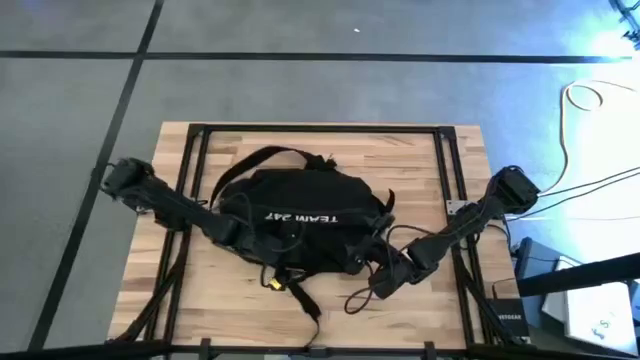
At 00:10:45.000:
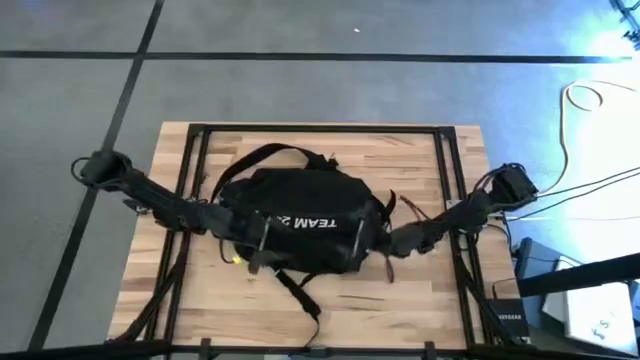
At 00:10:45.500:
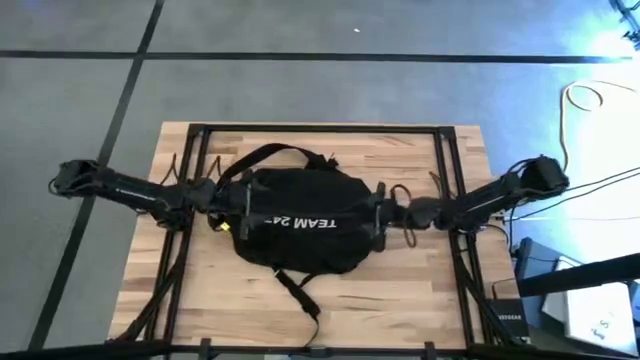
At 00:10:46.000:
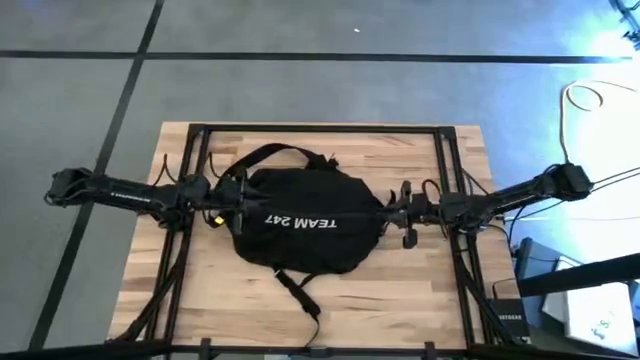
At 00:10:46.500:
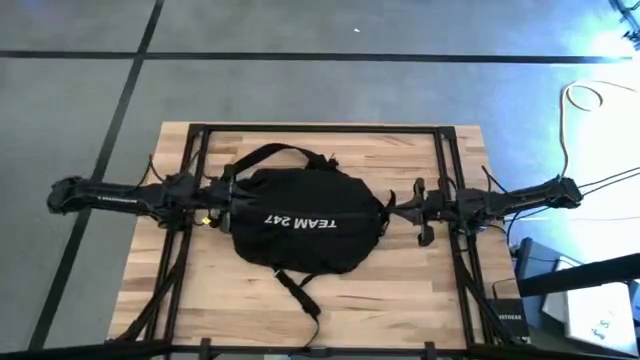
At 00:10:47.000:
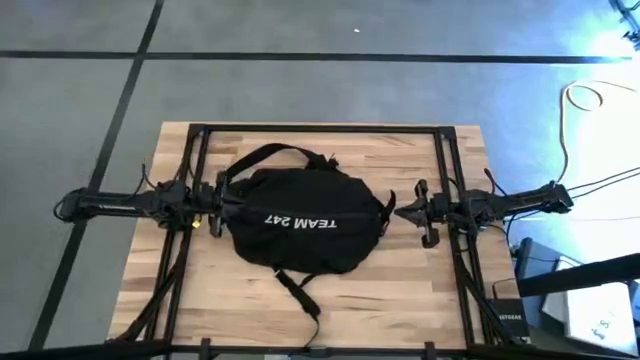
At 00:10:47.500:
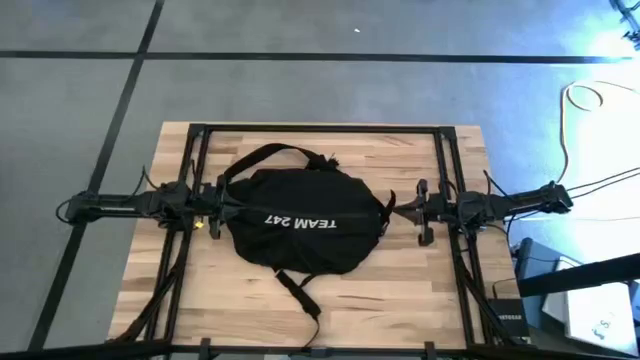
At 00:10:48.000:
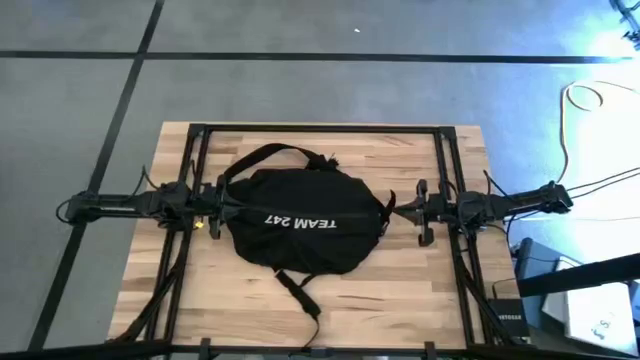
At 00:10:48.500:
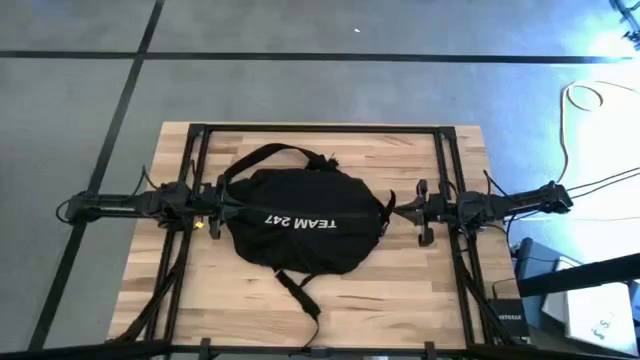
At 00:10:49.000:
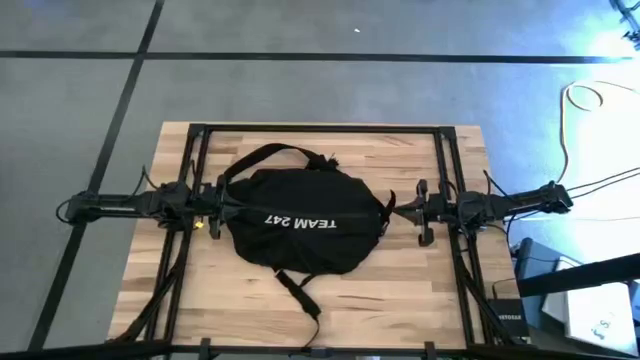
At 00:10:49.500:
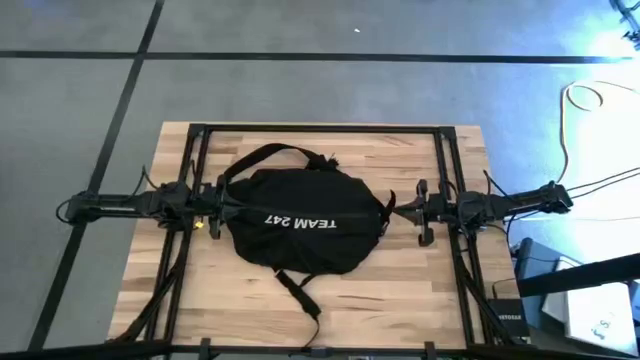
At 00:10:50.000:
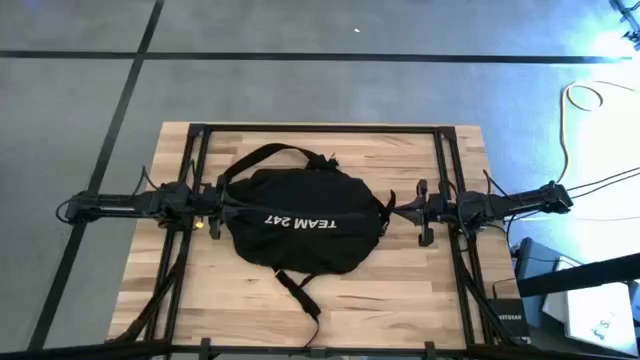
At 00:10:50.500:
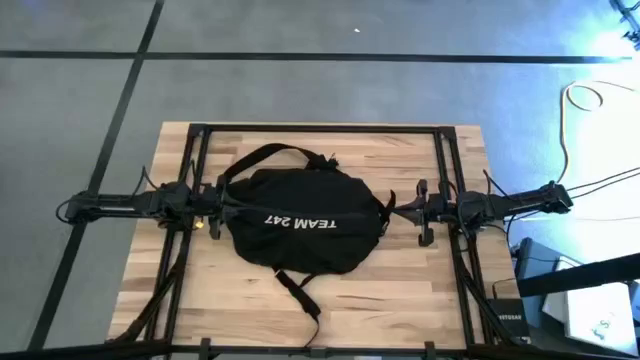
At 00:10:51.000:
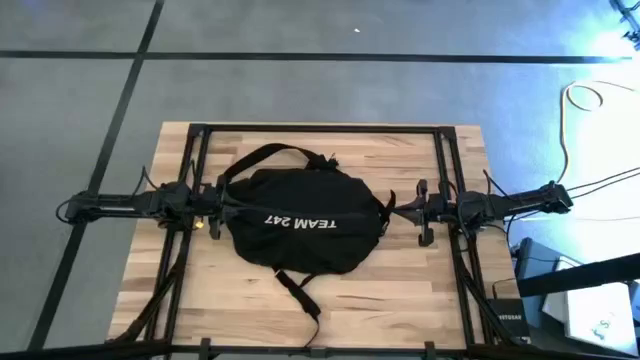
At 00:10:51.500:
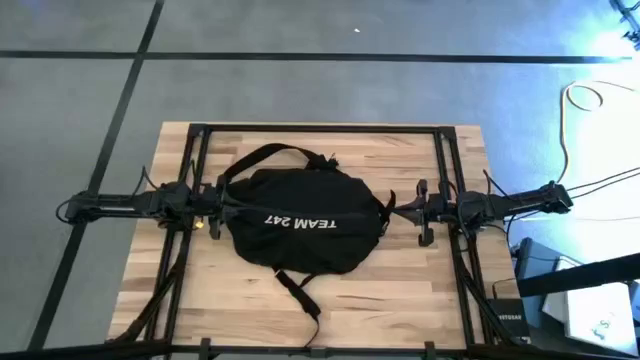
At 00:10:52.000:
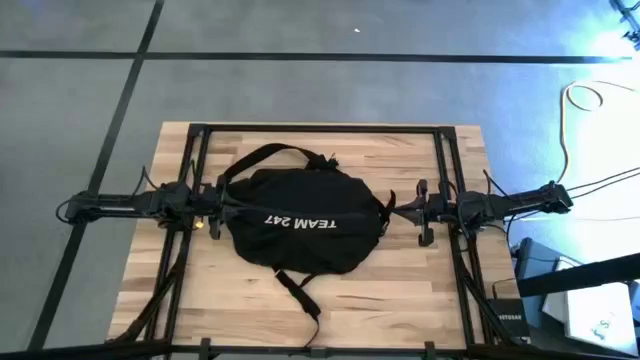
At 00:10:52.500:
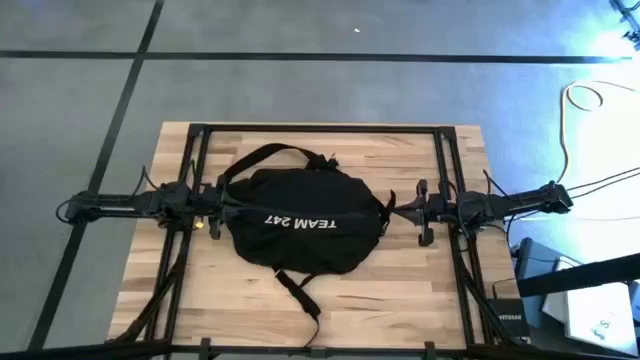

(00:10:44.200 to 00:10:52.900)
Task: Unpack backpack
Return to Home Position

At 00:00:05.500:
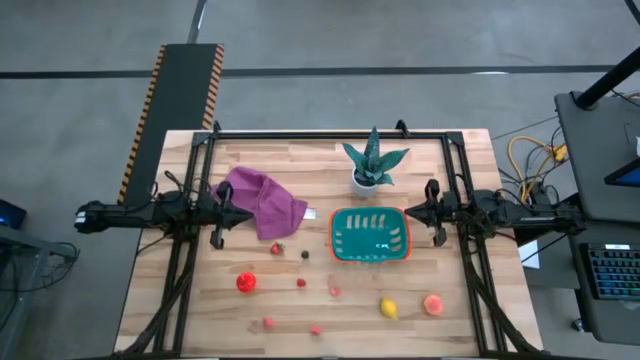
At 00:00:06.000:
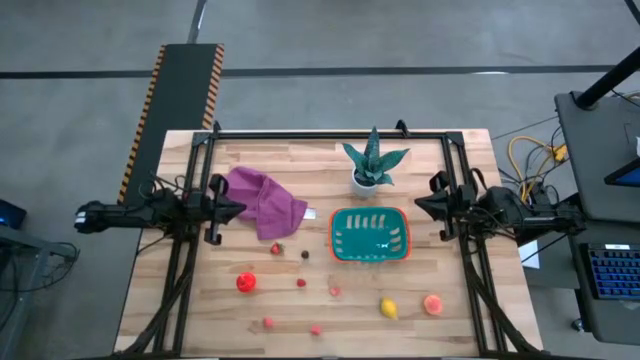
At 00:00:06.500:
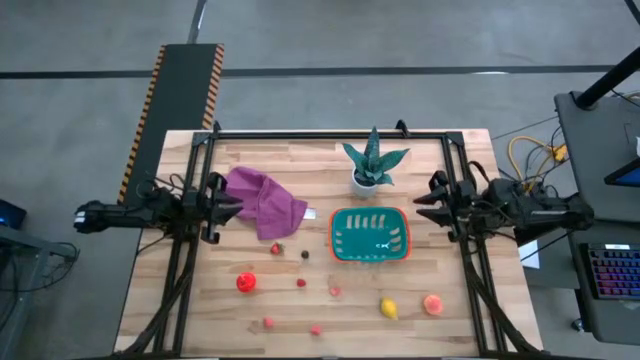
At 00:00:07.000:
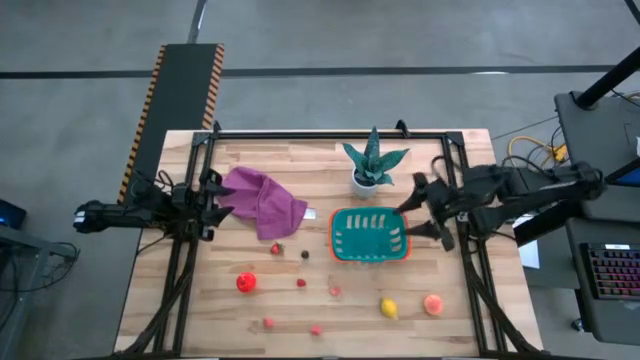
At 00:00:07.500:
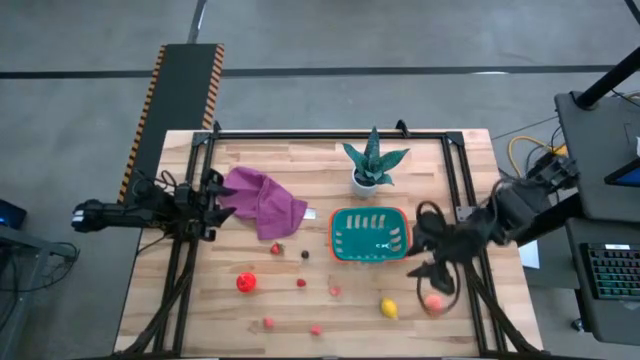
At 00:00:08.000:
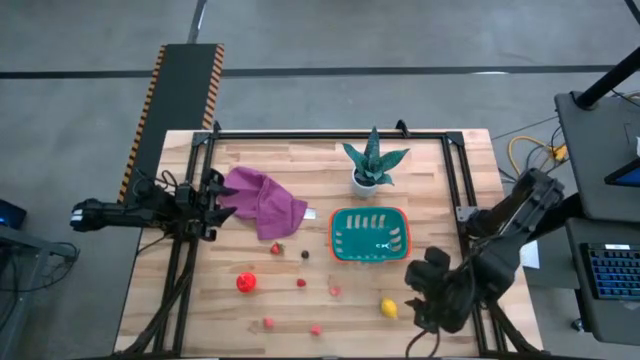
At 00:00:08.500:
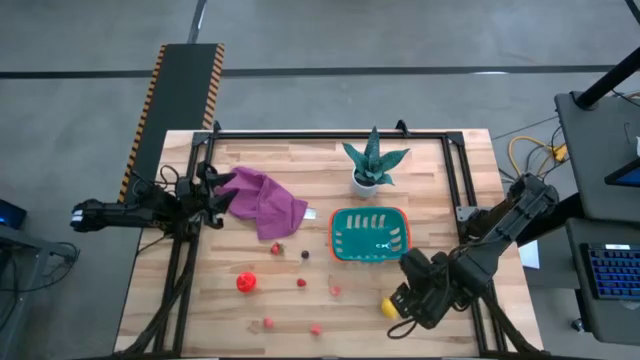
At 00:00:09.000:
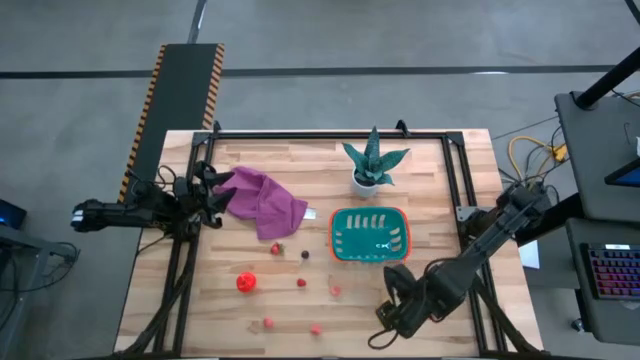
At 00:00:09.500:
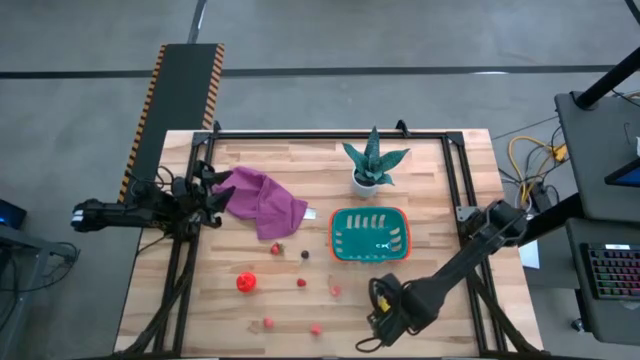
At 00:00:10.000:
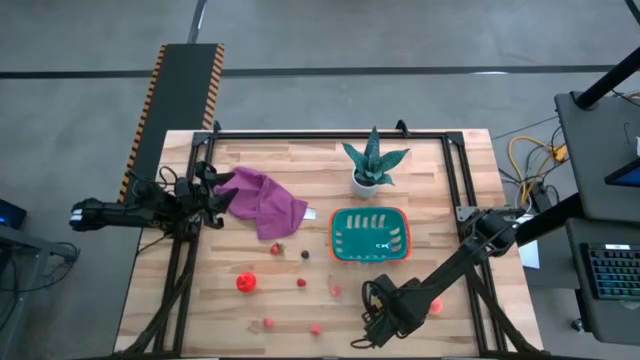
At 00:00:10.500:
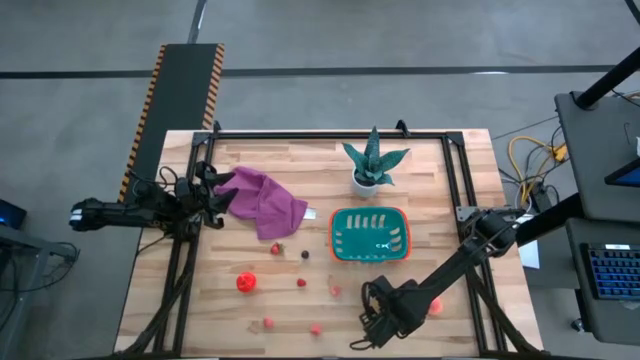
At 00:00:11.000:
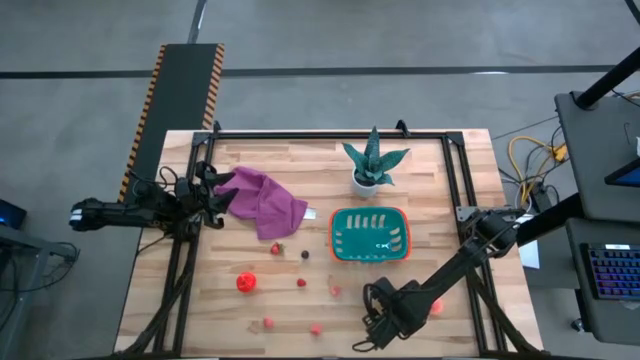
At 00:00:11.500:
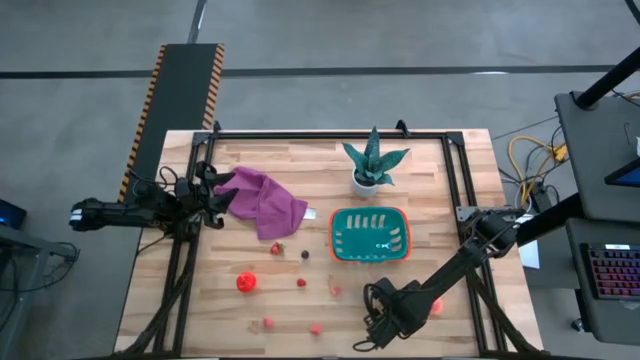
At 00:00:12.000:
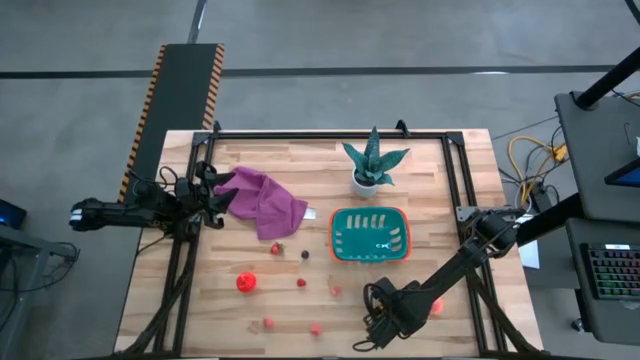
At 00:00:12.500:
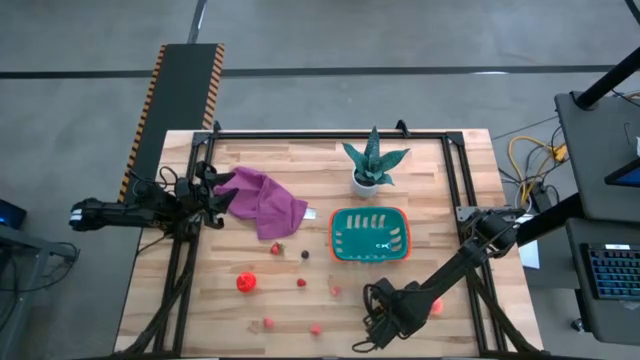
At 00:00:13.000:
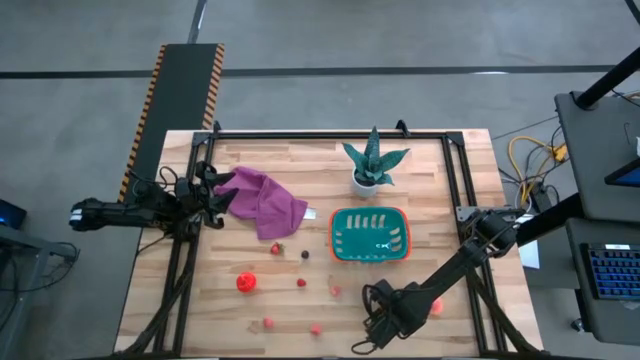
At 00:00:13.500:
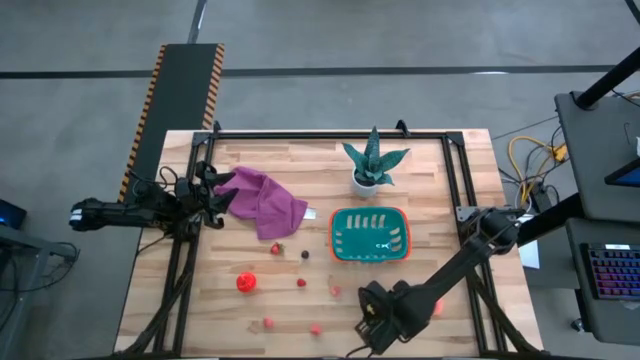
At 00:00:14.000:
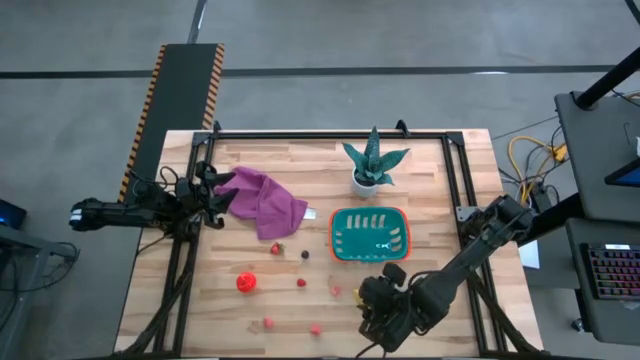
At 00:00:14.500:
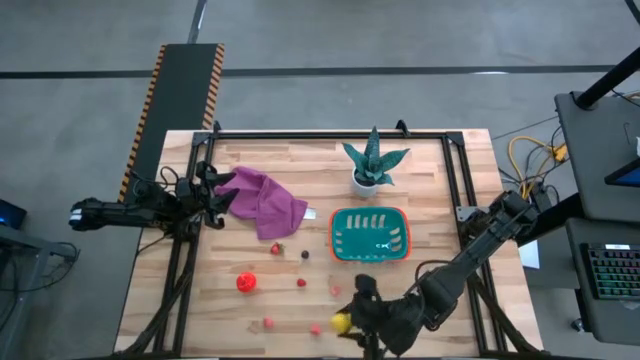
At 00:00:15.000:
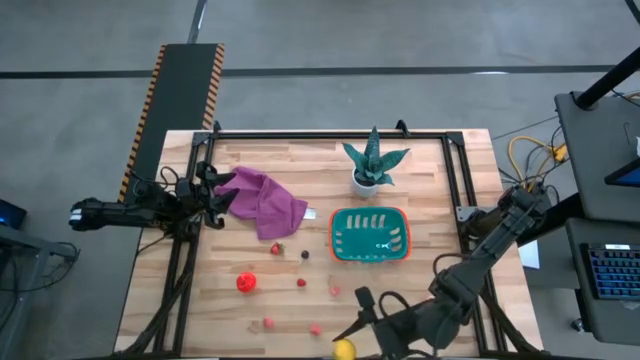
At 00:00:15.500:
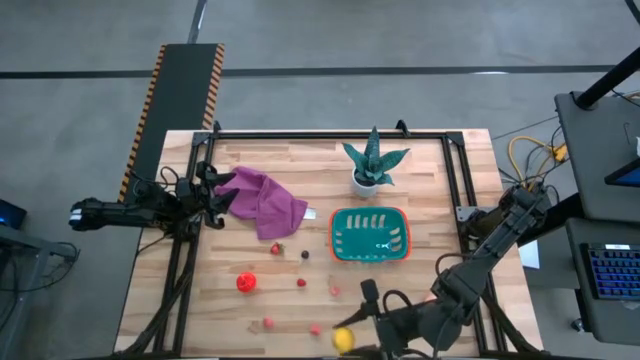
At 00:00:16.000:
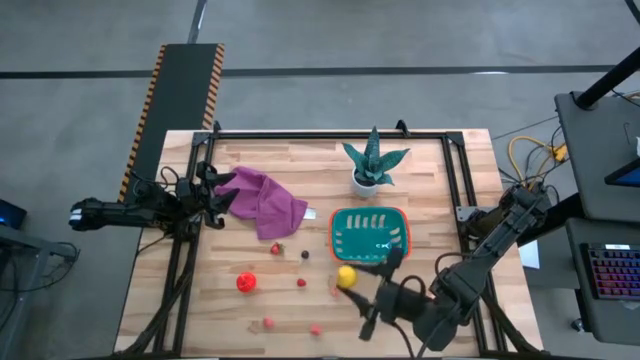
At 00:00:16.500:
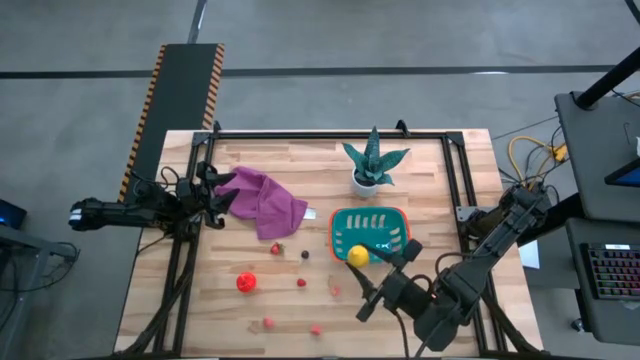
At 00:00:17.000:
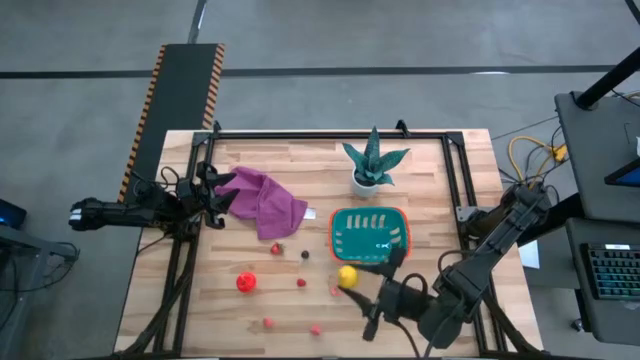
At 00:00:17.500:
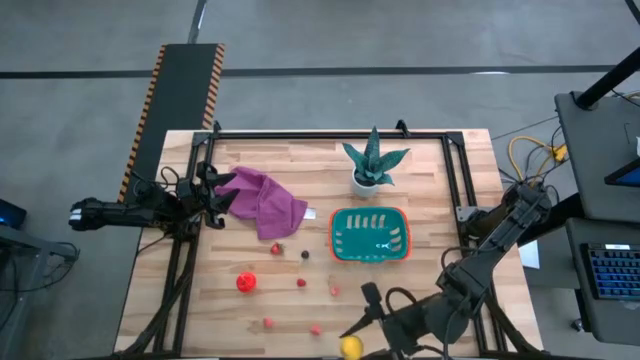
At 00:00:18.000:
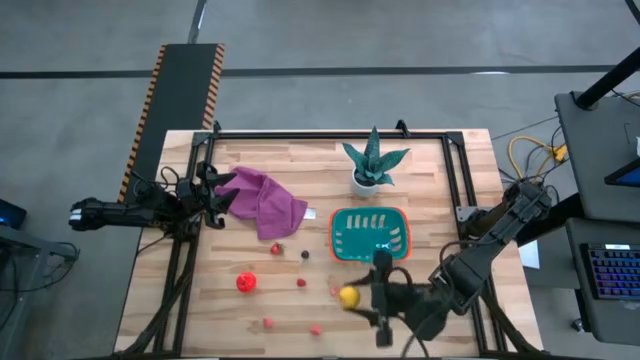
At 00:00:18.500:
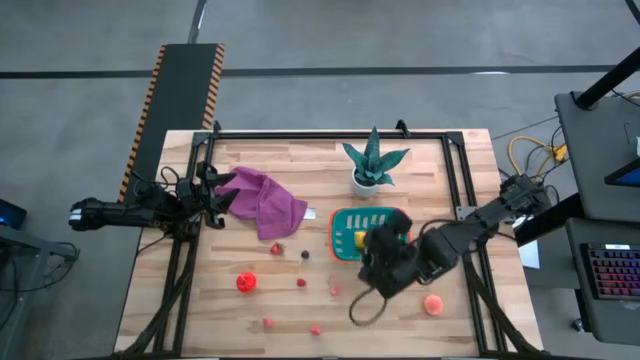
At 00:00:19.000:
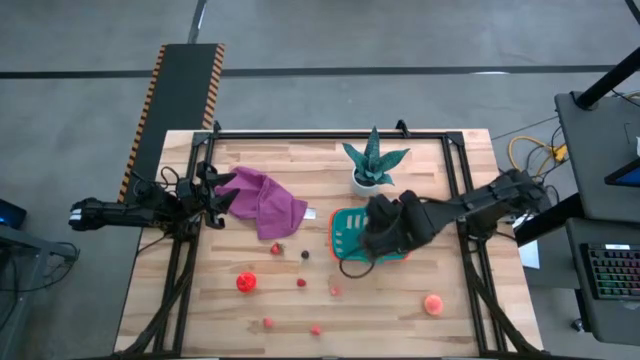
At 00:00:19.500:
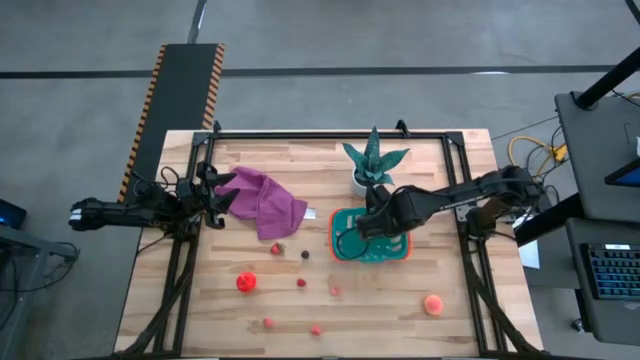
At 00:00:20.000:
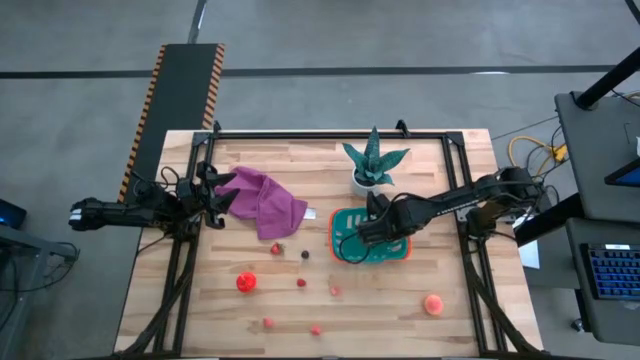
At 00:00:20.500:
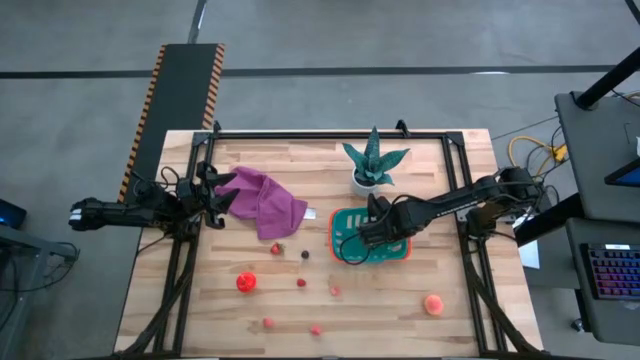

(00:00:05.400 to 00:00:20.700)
Task: Pick and placing Produce into tupperware
Put the lemon into the green basket
